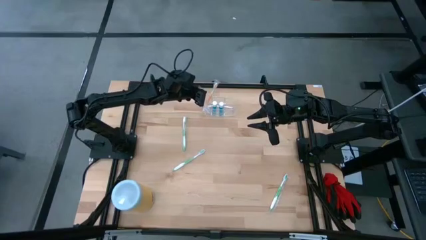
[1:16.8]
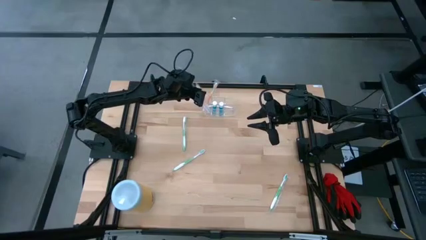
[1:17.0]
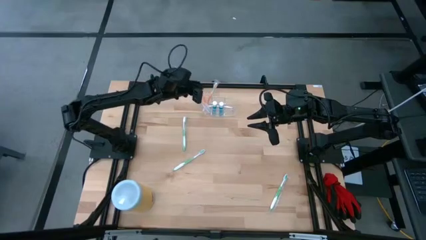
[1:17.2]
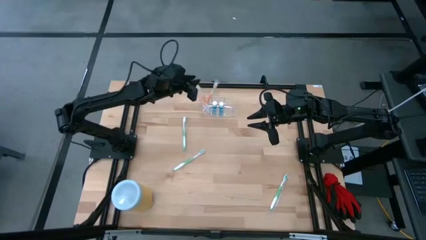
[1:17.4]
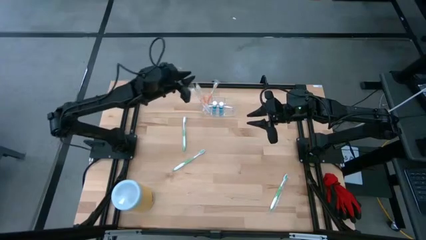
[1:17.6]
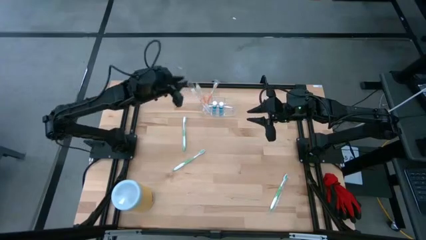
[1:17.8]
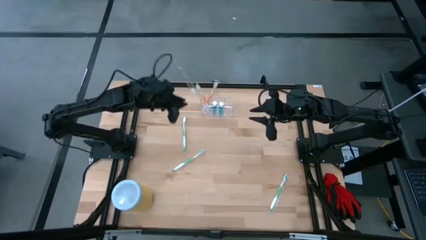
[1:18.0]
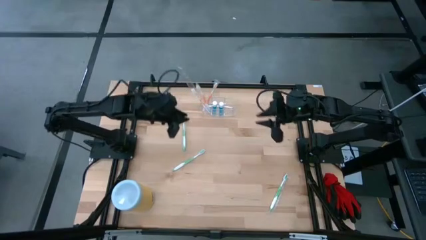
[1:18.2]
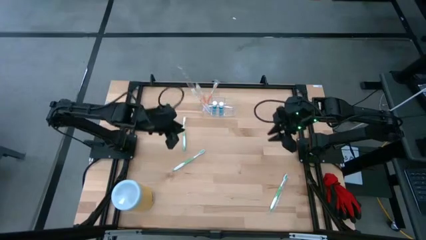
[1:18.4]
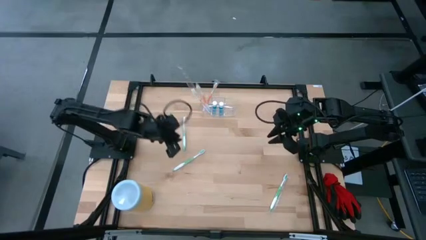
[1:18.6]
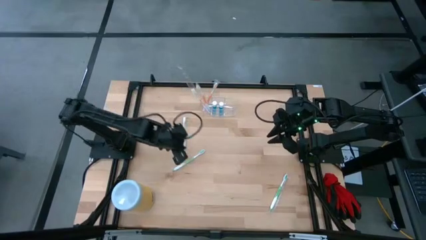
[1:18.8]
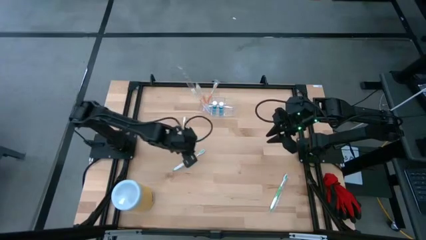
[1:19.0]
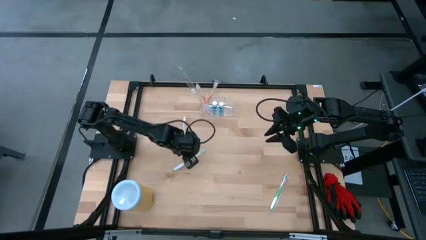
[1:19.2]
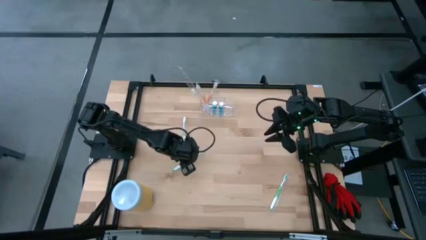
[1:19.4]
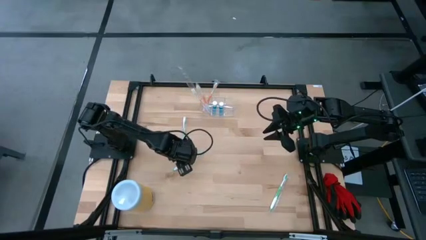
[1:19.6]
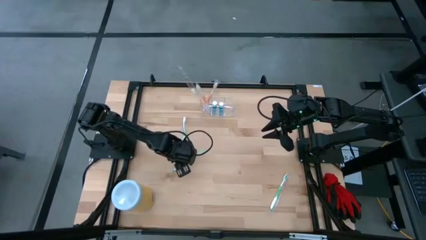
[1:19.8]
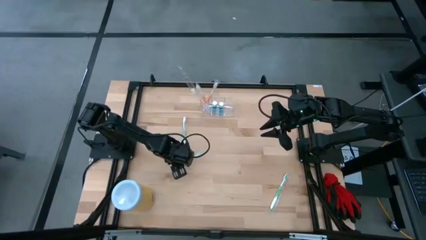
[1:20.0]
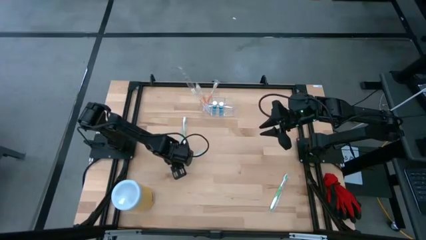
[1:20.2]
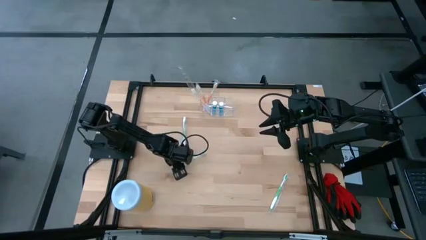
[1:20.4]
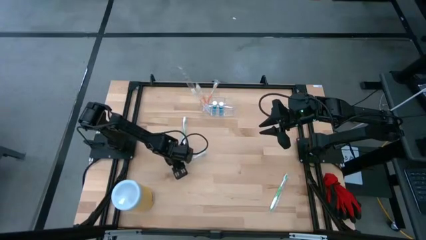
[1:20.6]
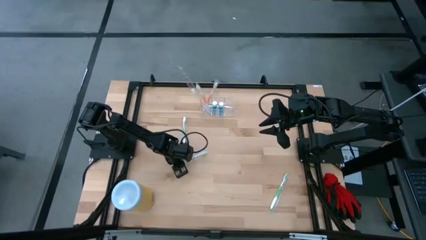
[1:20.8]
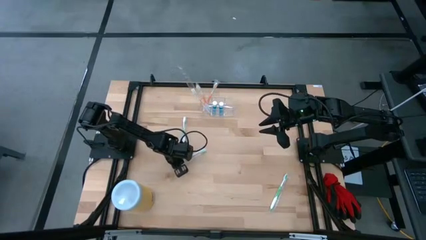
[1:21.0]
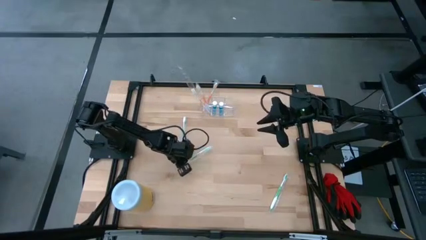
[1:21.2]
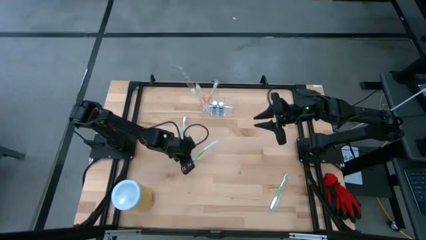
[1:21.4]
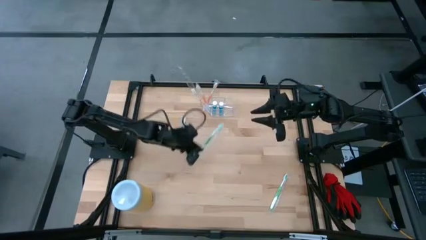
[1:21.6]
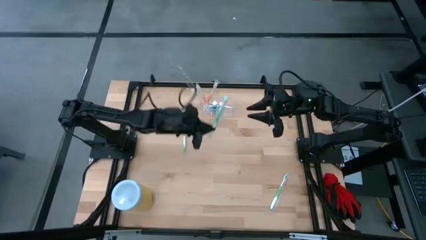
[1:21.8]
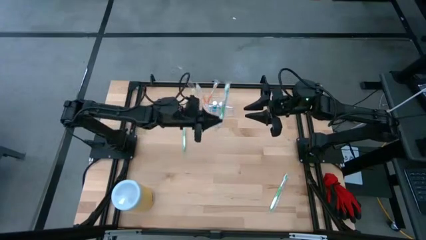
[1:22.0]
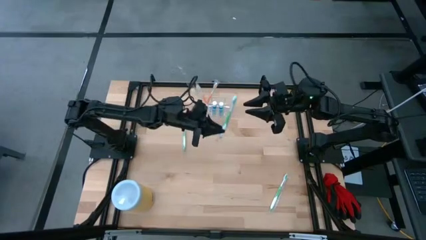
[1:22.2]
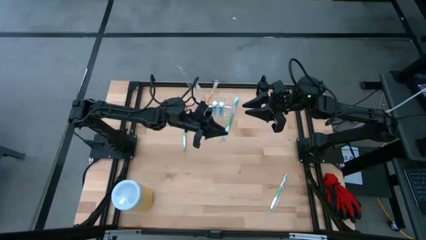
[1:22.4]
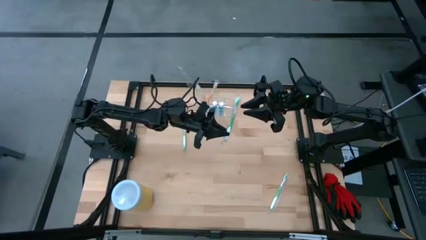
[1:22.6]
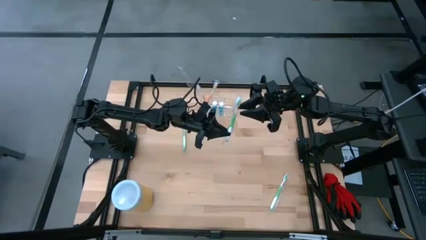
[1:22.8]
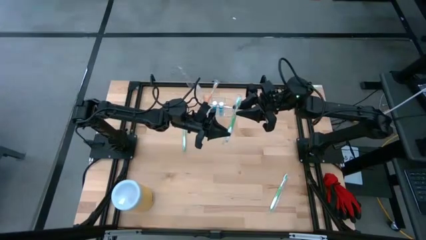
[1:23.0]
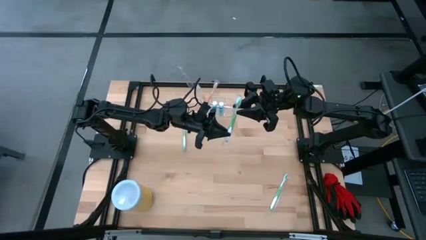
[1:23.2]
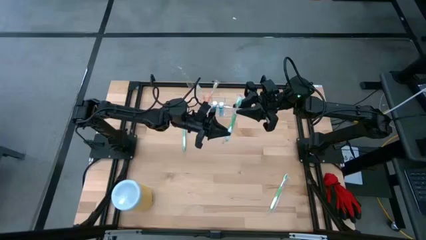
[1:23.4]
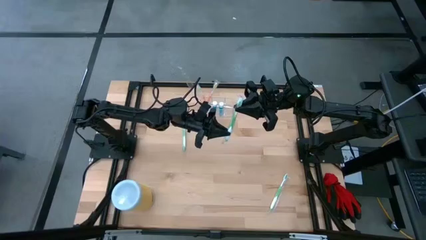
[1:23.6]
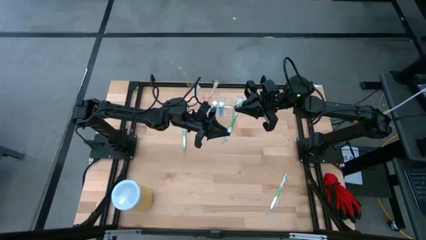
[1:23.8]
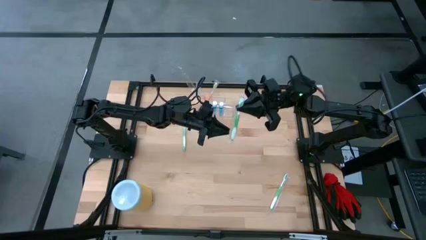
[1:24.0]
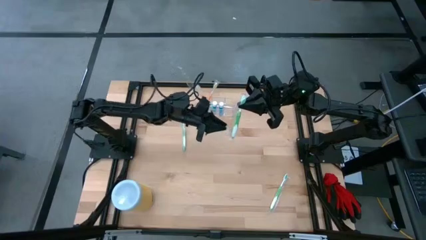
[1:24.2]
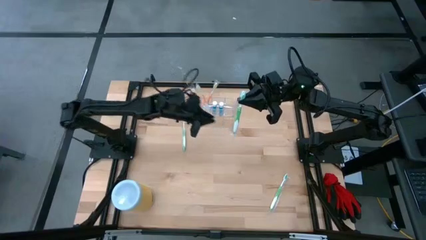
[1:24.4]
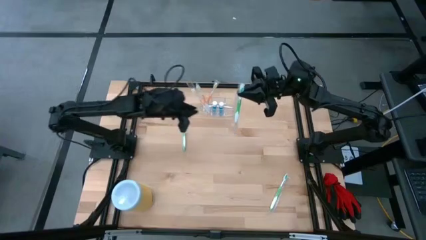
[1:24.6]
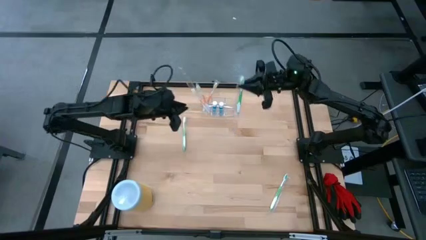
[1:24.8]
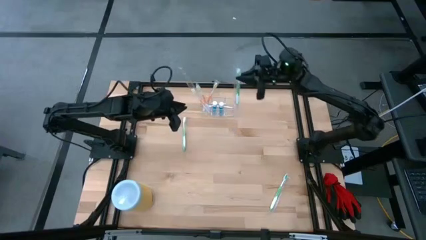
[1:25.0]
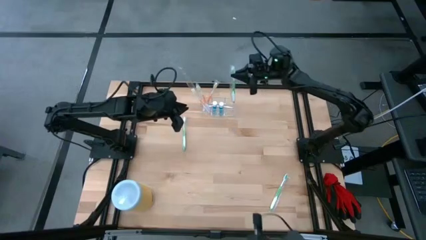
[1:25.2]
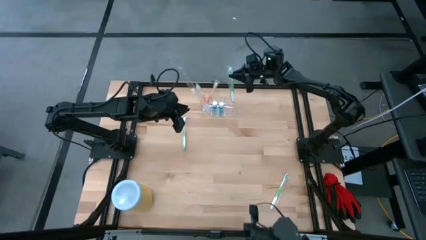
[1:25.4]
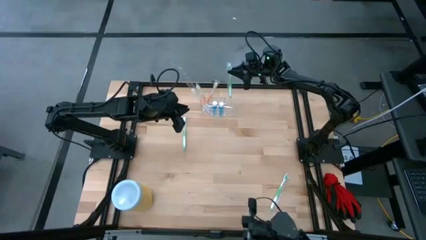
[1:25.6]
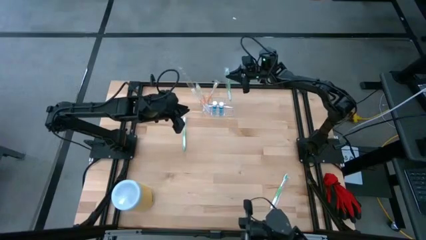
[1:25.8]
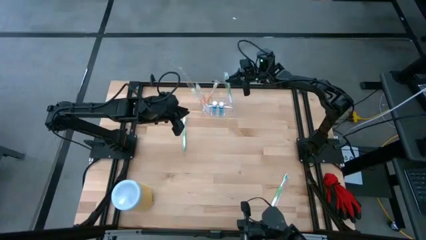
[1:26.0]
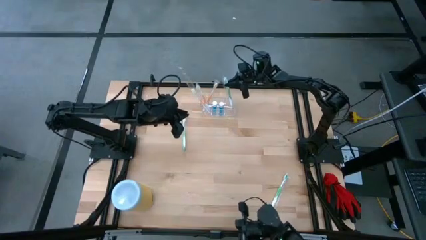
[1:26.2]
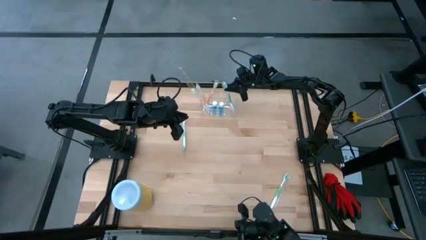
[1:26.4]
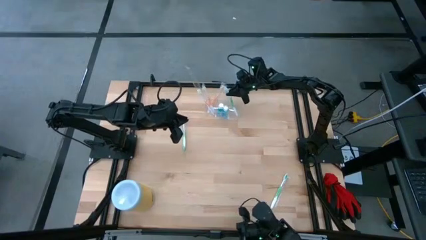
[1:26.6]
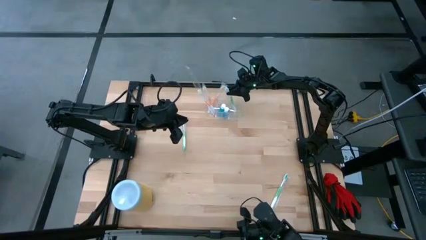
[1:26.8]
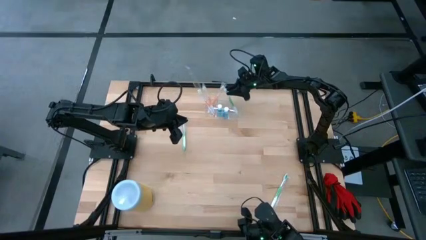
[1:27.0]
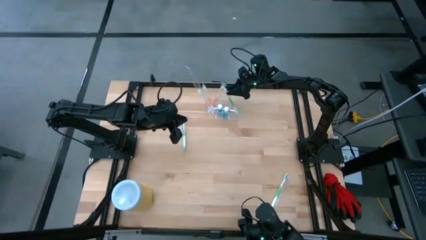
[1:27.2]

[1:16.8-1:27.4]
Task: Pick & Place toothbrushing station
Put the middle green toothbrush into the transparent organizer
